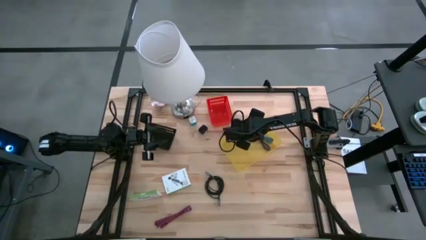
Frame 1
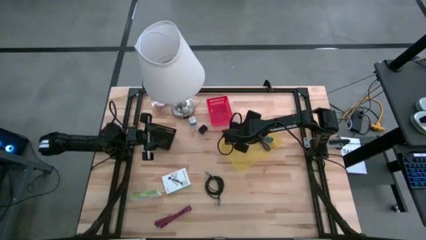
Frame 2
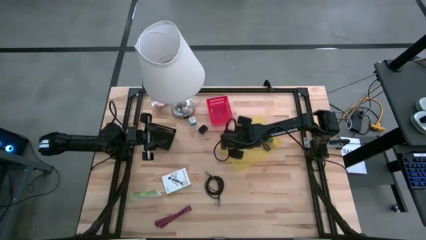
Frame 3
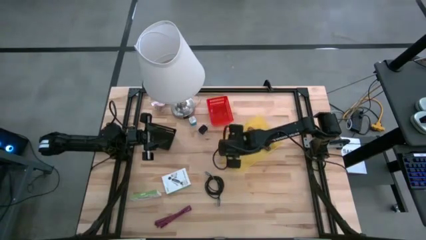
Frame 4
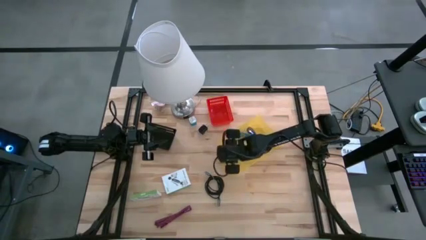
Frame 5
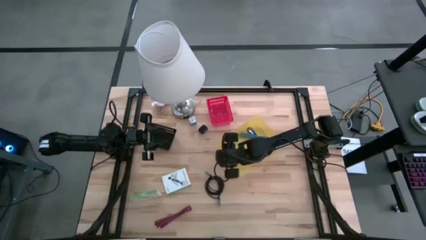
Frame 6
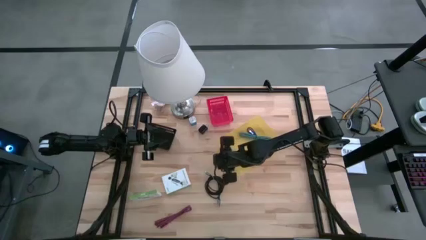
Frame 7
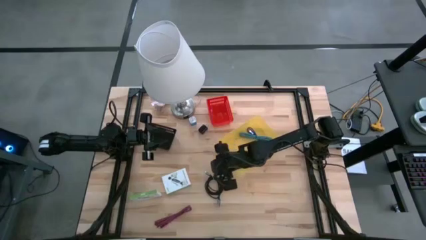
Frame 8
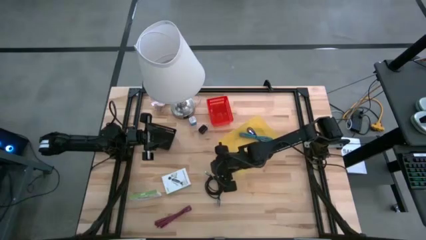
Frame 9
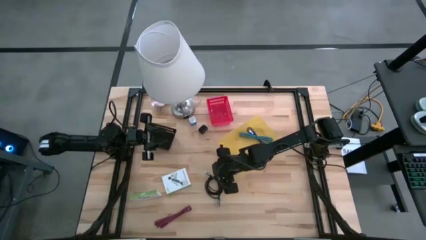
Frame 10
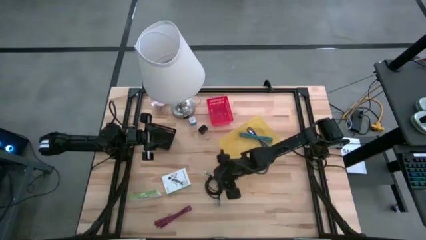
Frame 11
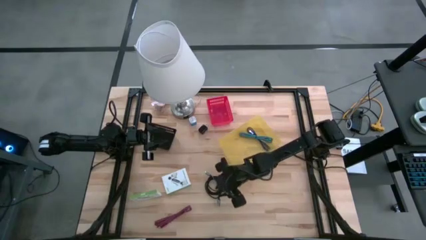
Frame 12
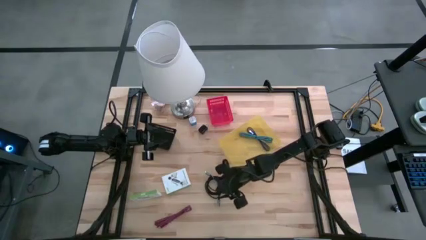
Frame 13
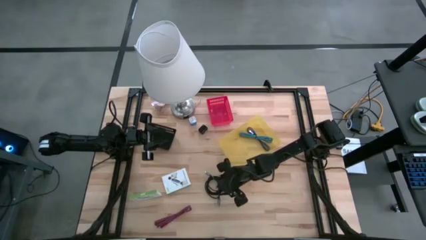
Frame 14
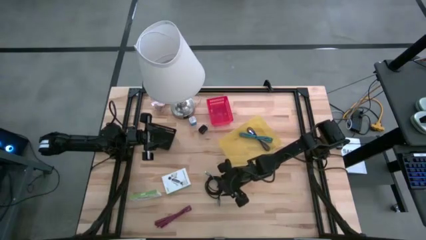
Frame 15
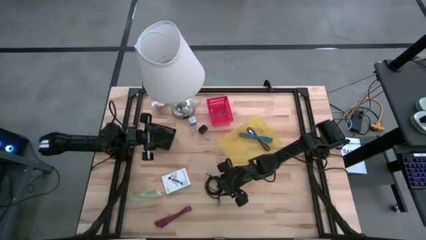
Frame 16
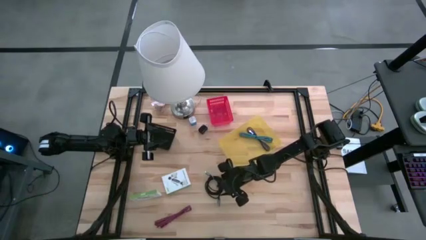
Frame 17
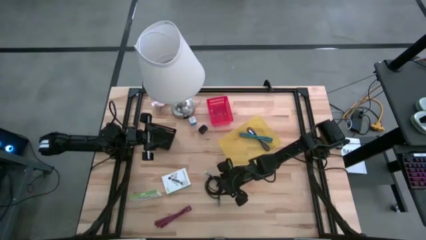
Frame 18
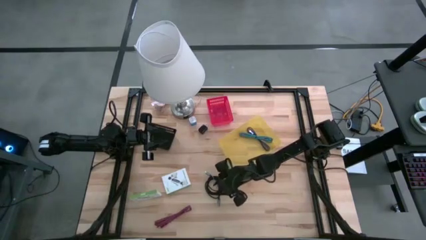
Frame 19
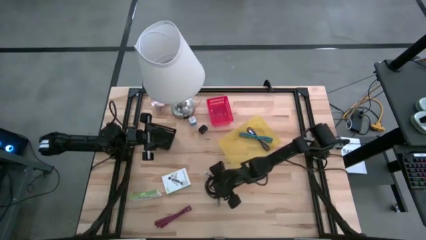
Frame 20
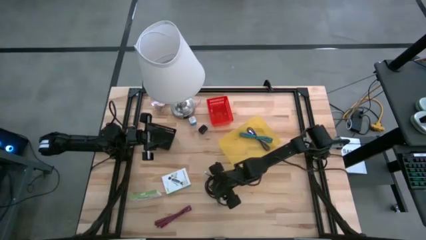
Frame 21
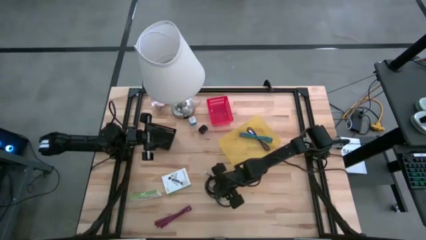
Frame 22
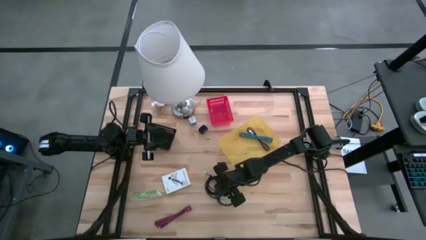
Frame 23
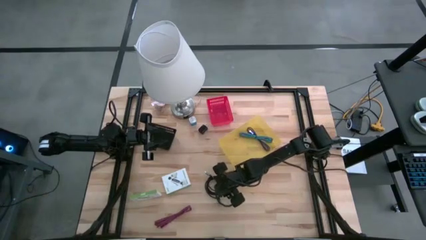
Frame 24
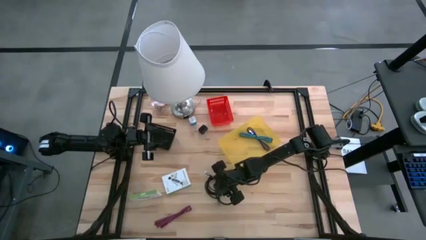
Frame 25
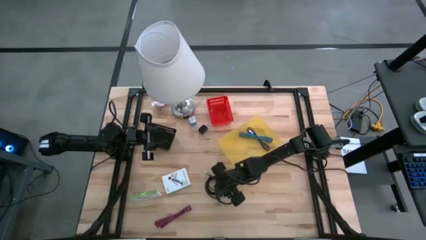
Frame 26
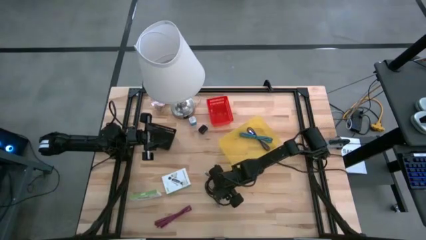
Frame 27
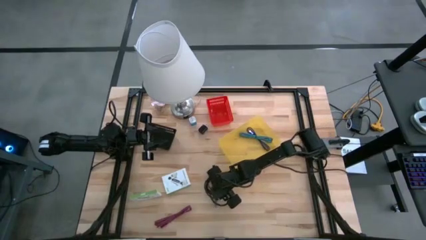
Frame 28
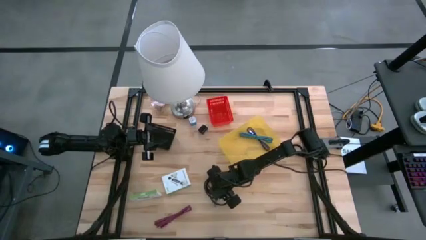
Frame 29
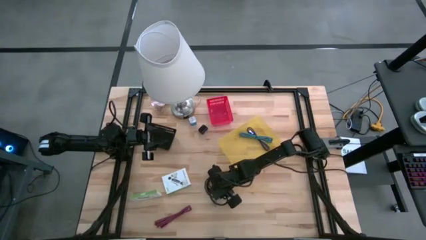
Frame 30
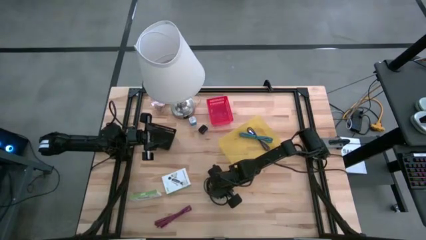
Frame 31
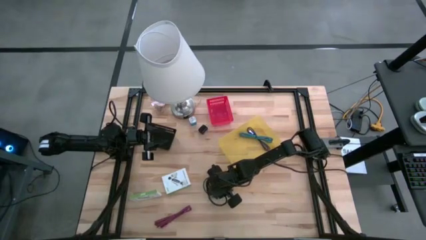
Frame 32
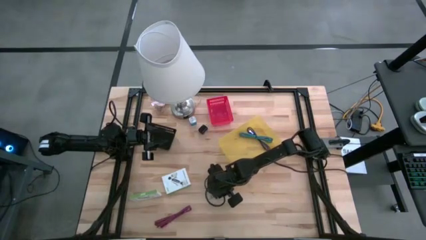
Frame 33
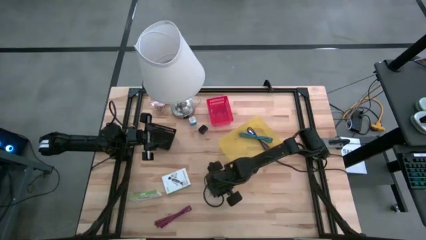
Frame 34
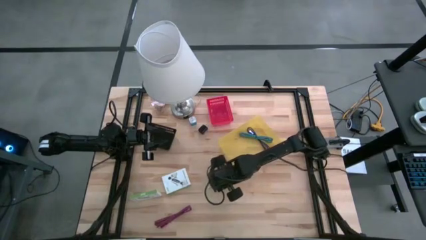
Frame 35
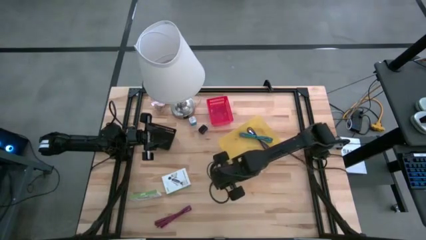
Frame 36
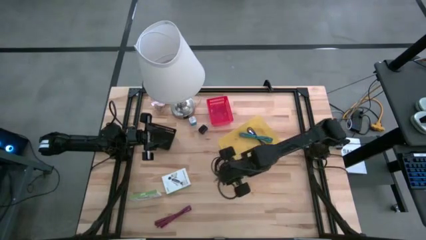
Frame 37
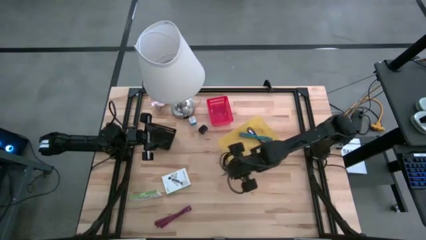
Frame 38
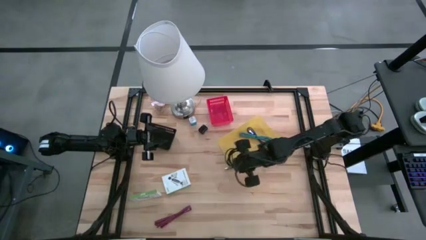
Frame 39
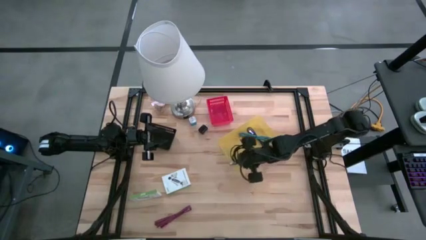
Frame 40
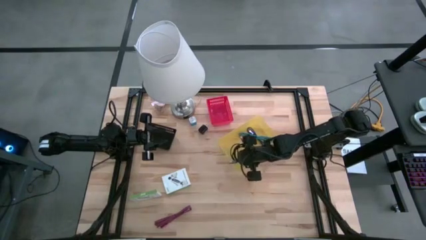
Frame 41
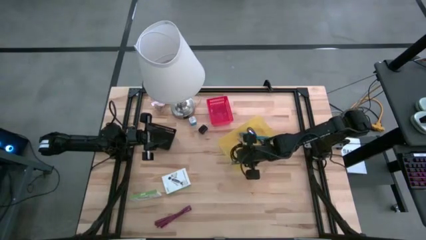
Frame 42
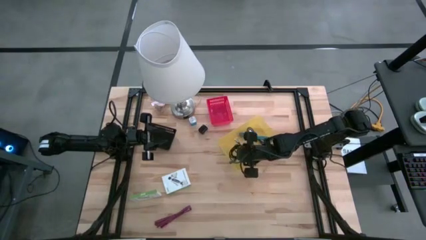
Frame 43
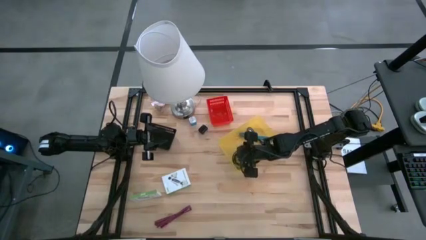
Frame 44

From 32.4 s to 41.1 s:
Task: Pick and place items into bin
Put the black charger cable into the yellow bin

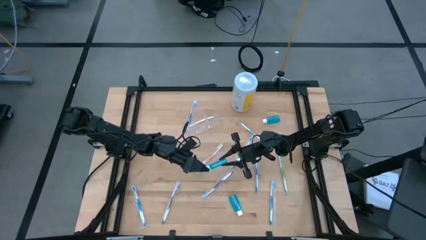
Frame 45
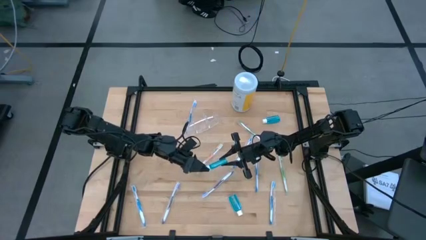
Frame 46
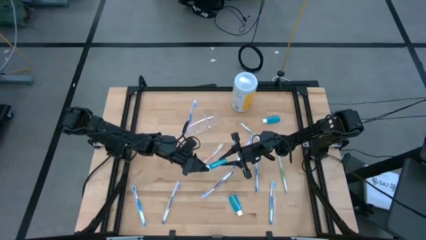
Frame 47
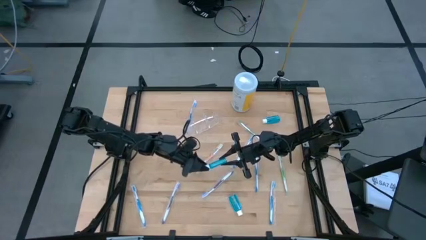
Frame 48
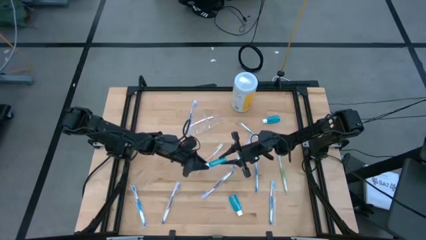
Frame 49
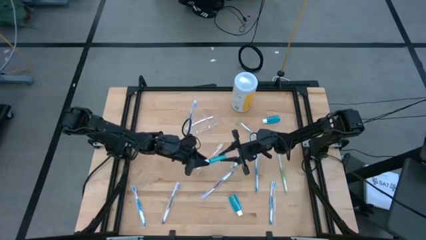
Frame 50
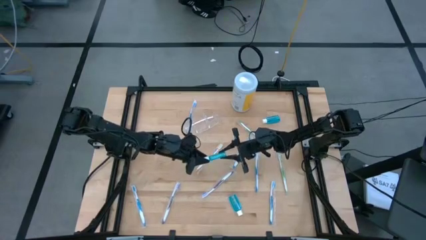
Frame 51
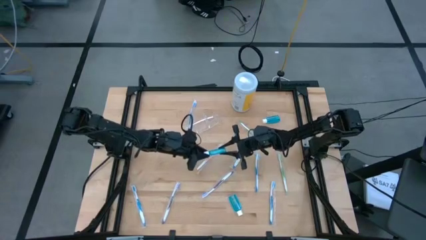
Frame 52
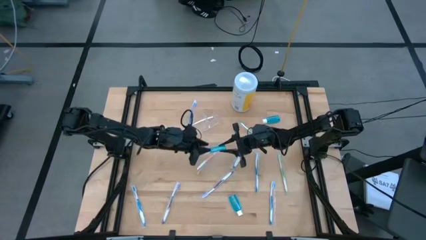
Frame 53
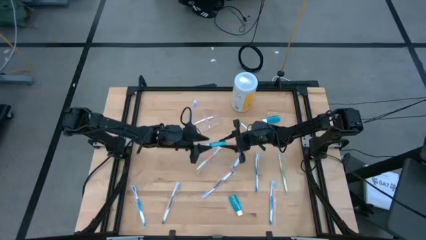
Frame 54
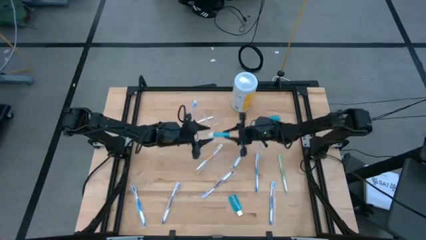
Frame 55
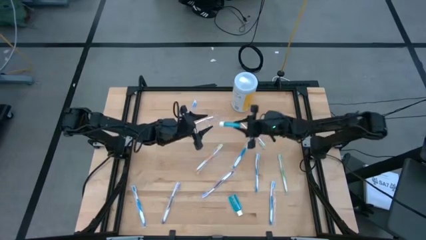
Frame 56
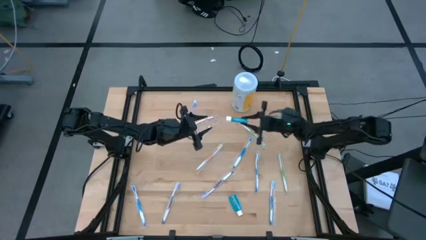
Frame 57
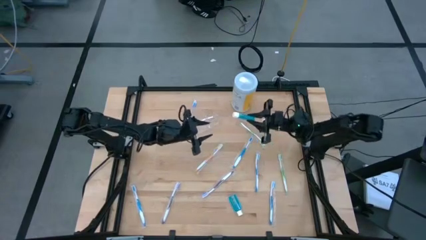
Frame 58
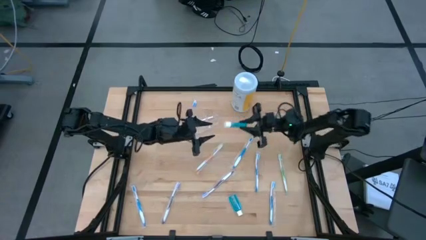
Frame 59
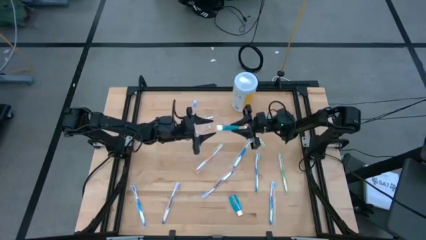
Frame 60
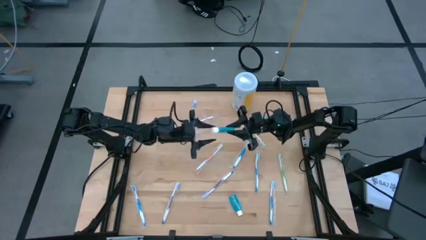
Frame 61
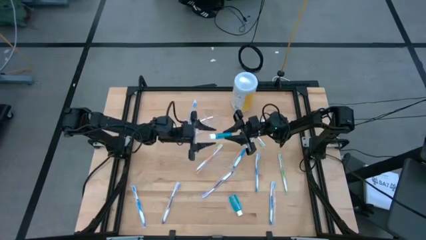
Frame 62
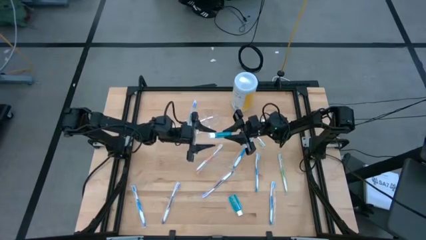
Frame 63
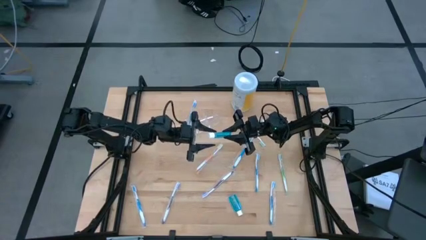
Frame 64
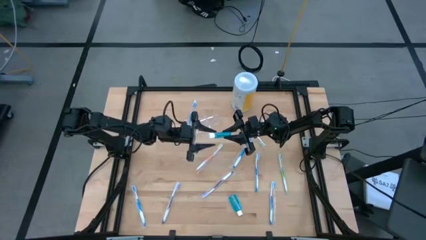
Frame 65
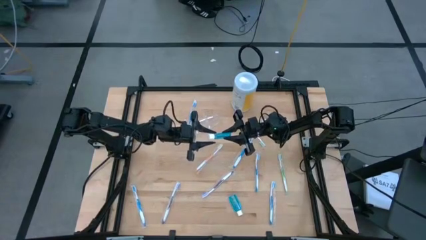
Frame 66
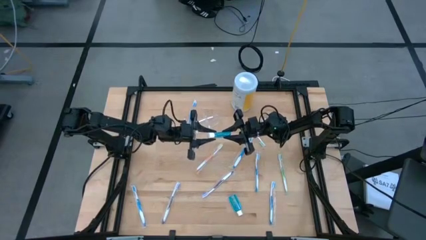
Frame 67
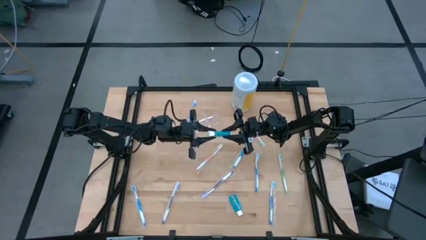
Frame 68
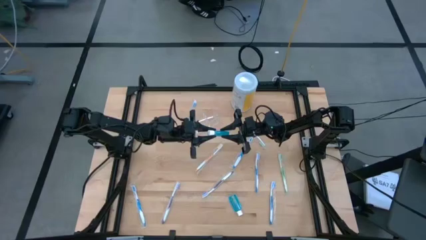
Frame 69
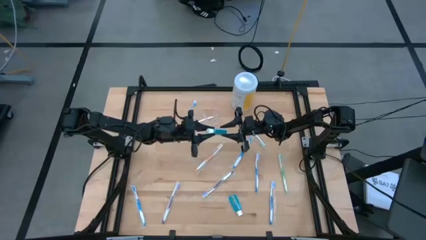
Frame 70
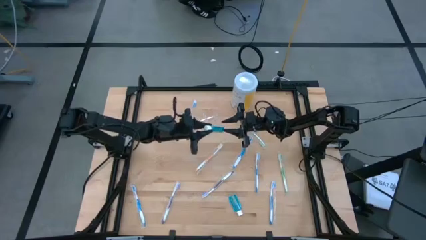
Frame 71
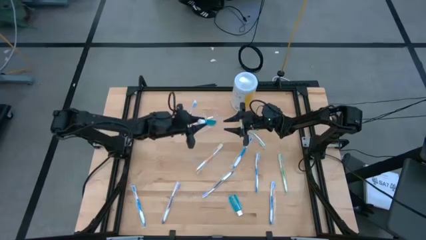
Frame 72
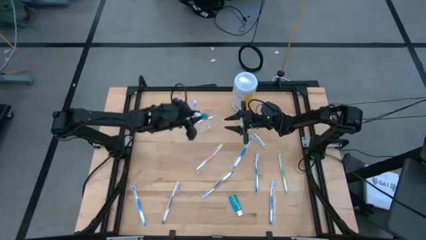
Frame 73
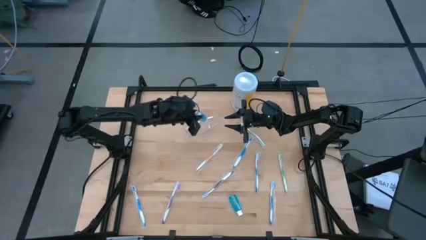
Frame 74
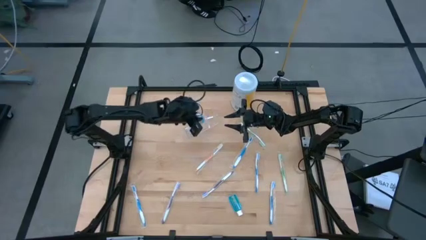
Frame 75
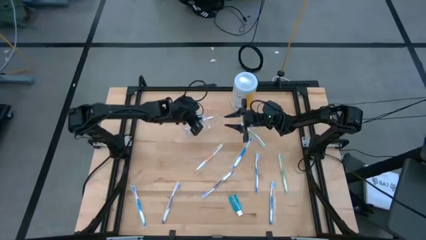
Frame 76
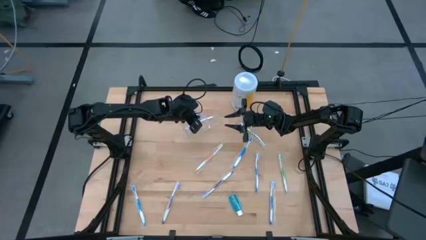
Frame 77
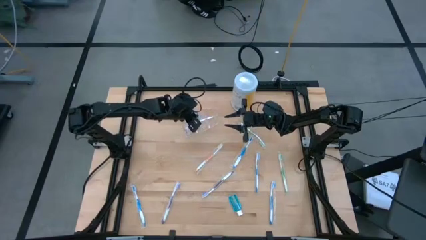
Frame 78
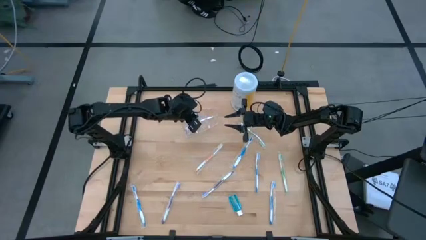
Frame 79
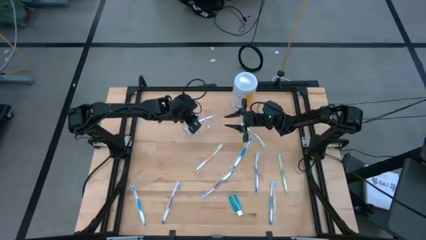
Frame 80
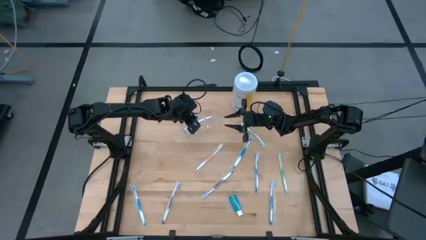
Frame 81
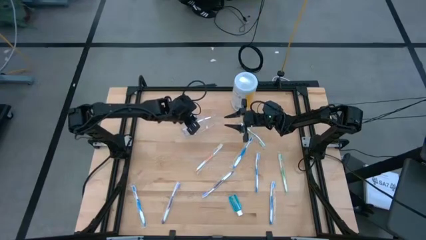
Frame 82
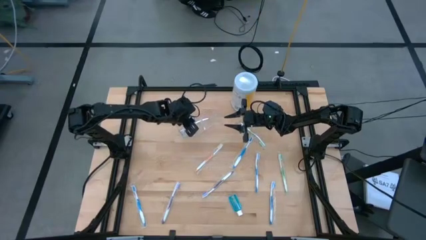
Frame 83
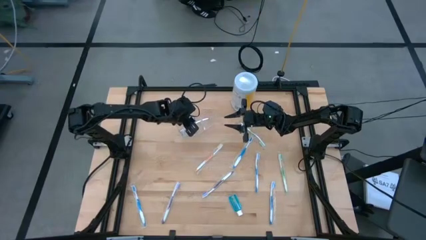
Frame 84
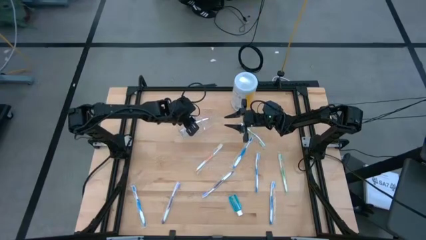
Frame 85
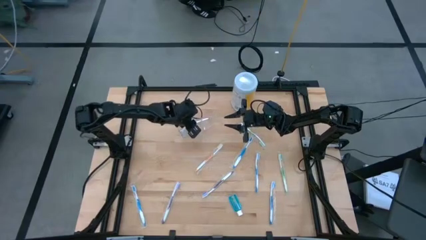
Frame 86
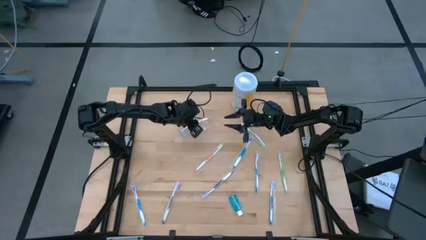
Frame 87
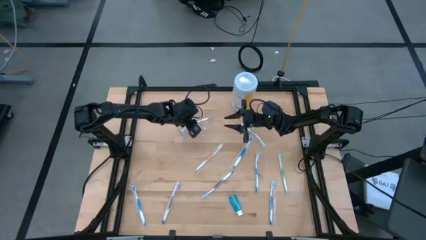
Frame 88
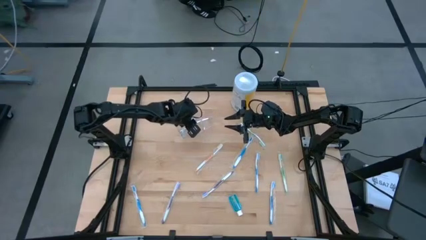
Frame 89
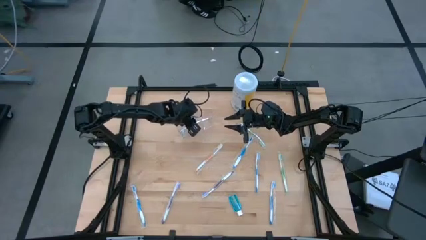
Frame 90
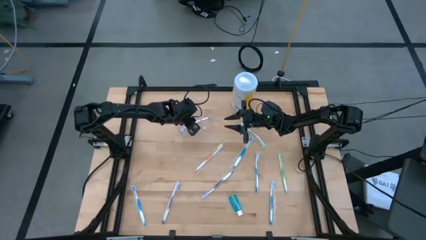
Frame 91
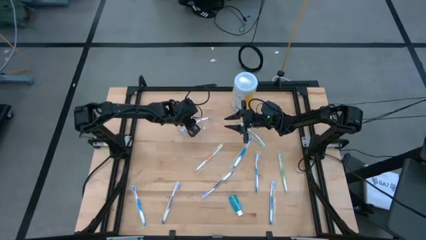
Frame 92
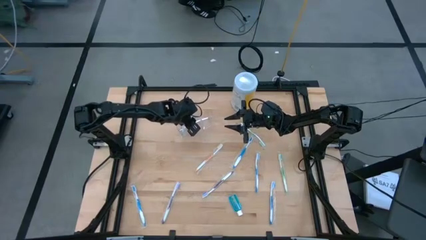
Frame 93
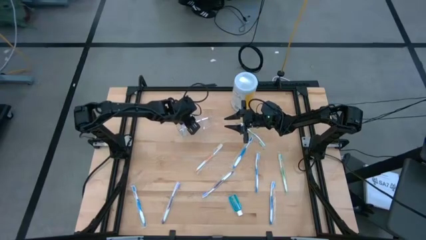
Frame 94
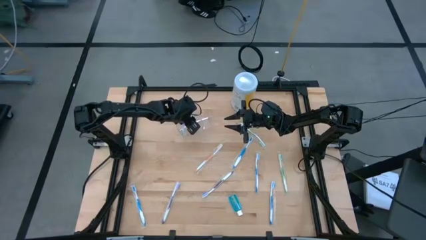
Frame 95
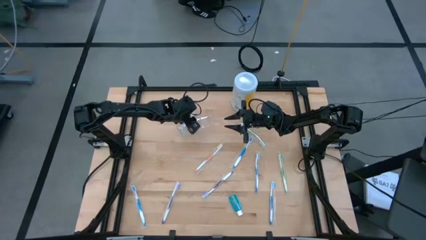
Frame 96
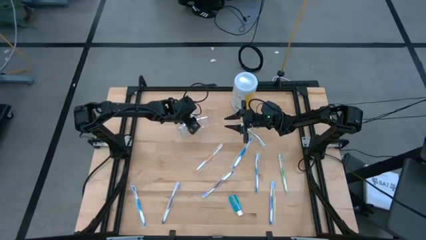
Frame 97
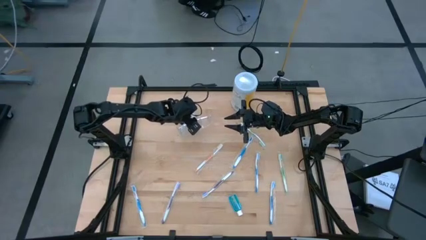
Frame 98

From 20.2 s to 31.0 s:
Task: Pick & Place toothbrushing station
Put the blue mouthwash into the transparent organizer
